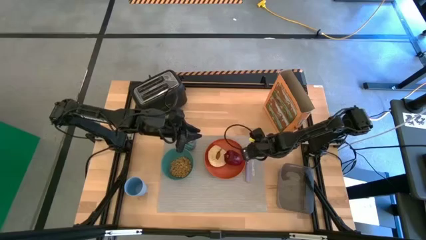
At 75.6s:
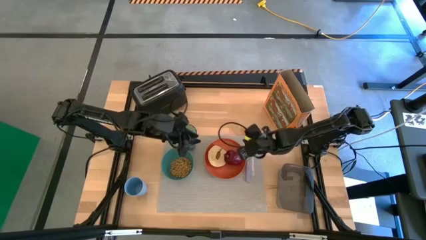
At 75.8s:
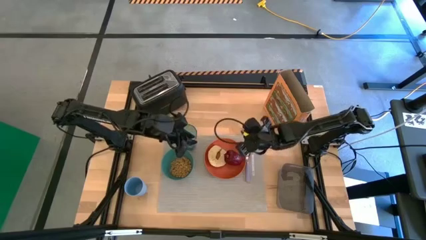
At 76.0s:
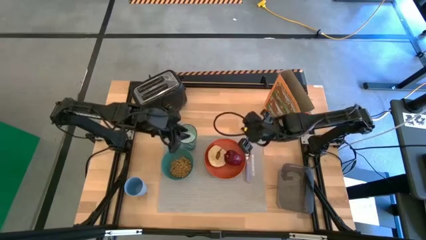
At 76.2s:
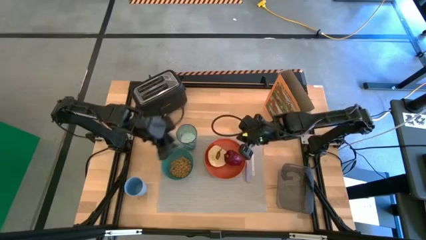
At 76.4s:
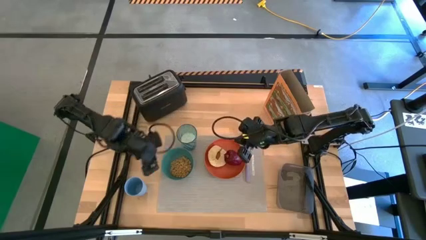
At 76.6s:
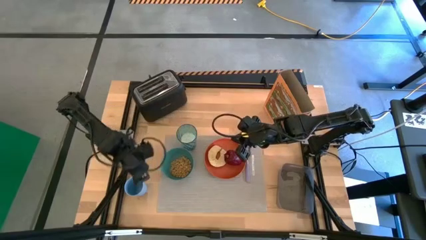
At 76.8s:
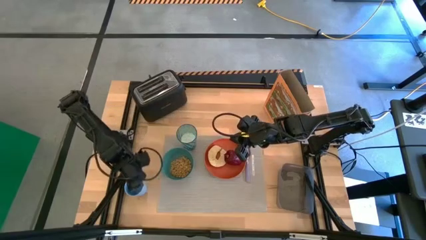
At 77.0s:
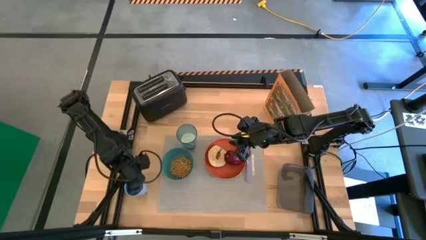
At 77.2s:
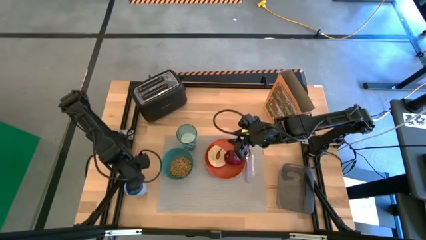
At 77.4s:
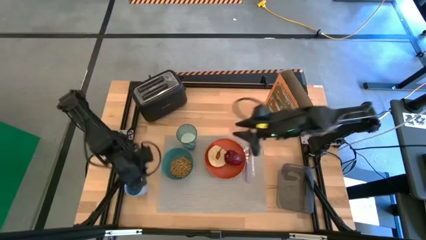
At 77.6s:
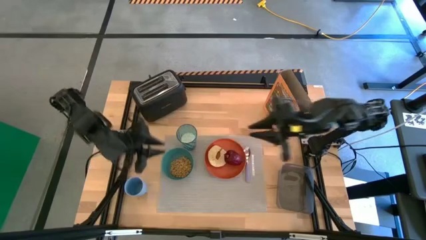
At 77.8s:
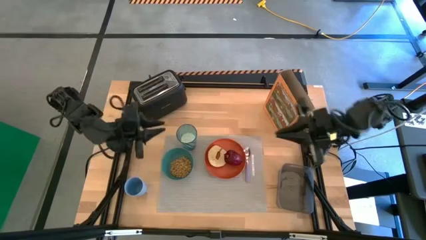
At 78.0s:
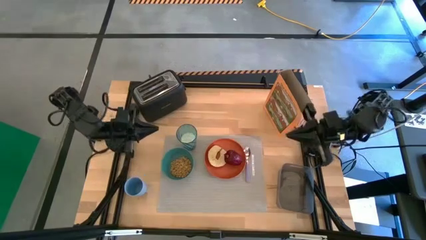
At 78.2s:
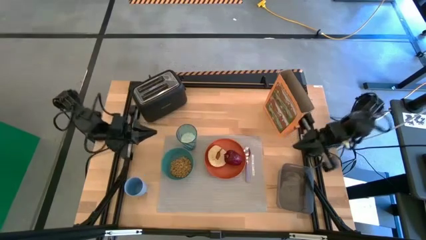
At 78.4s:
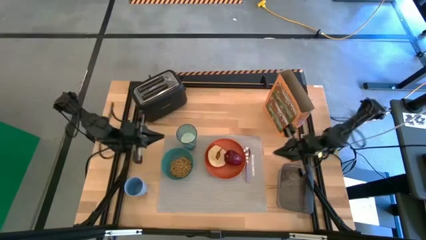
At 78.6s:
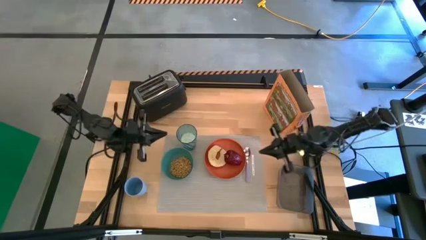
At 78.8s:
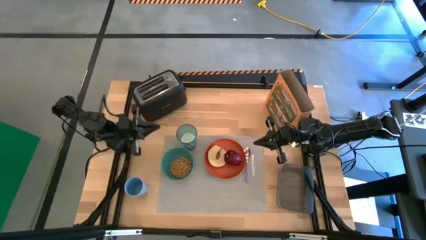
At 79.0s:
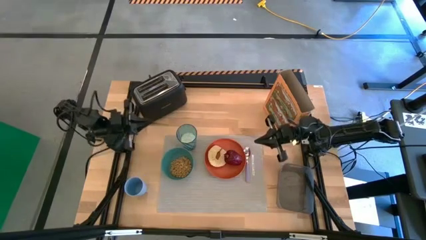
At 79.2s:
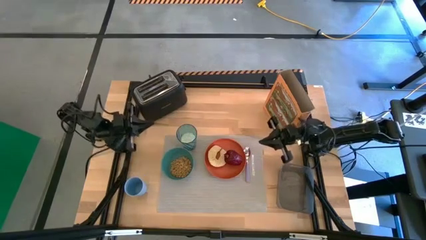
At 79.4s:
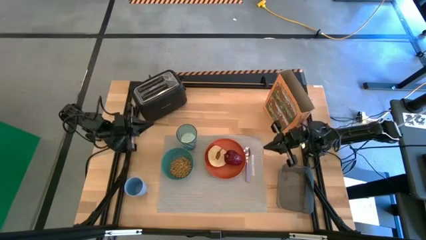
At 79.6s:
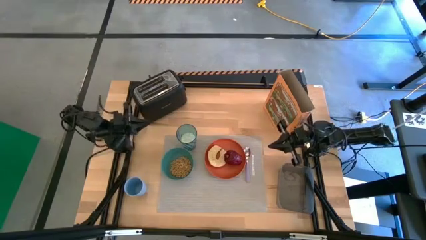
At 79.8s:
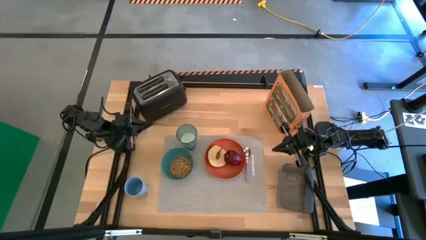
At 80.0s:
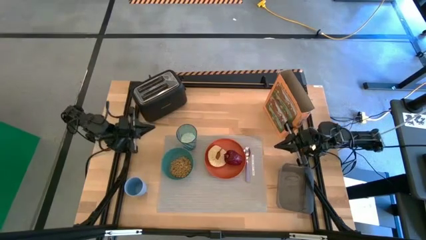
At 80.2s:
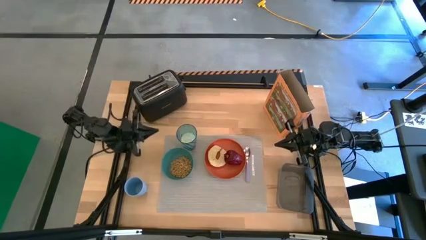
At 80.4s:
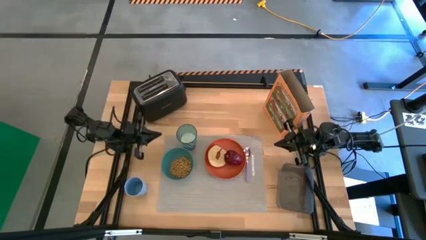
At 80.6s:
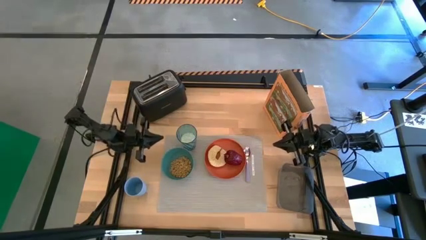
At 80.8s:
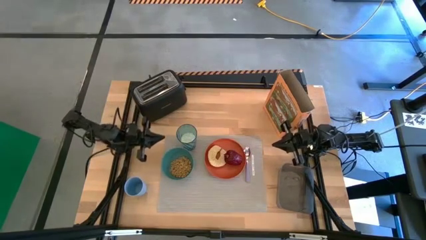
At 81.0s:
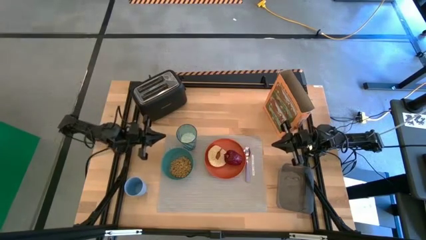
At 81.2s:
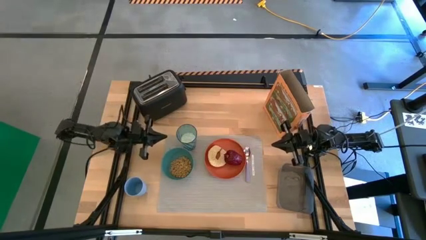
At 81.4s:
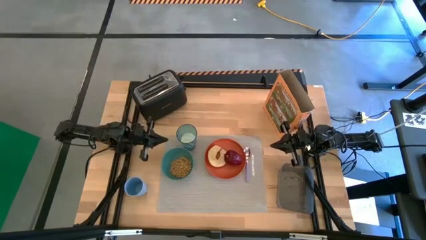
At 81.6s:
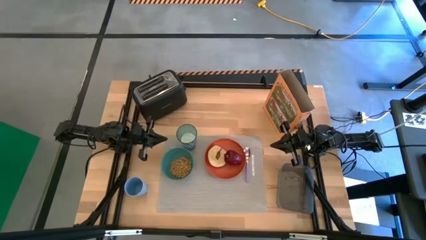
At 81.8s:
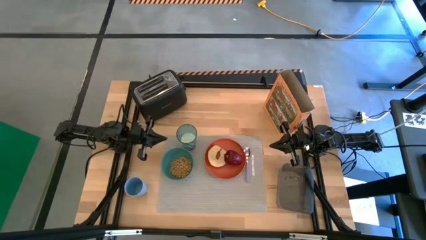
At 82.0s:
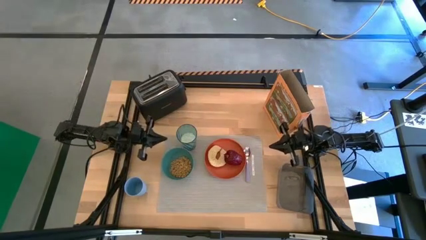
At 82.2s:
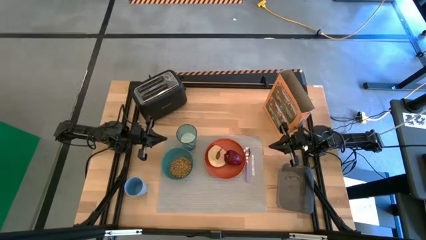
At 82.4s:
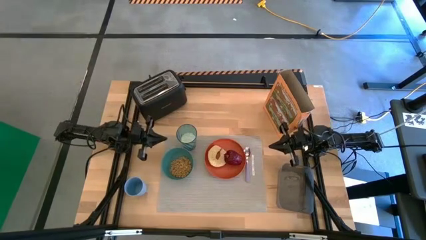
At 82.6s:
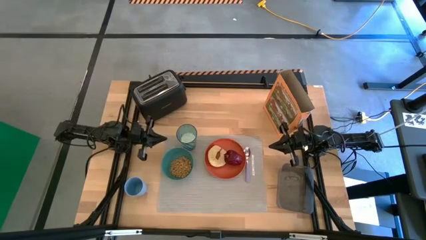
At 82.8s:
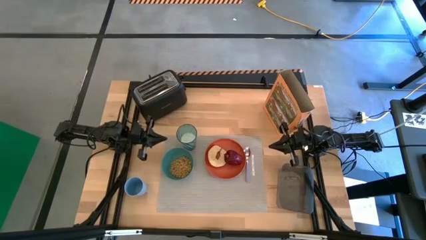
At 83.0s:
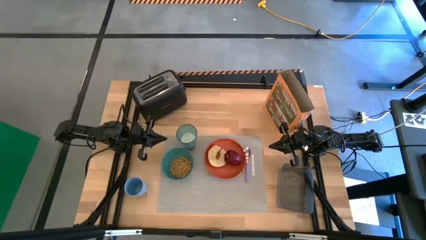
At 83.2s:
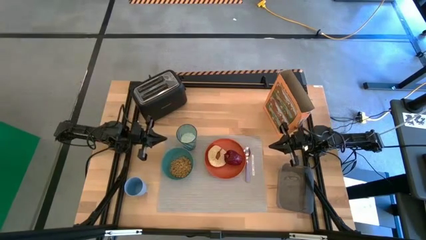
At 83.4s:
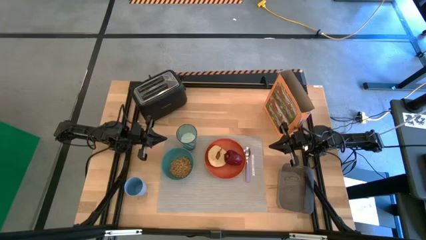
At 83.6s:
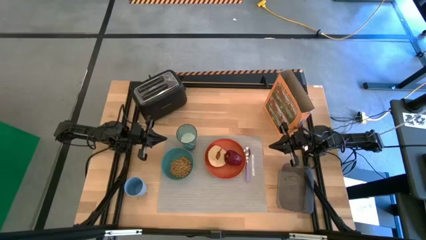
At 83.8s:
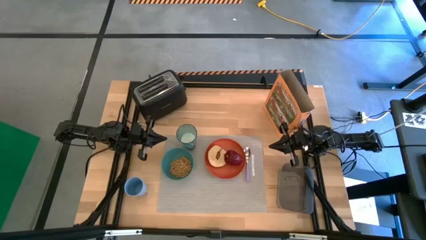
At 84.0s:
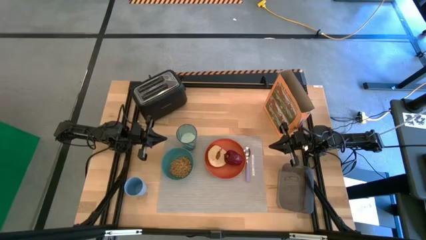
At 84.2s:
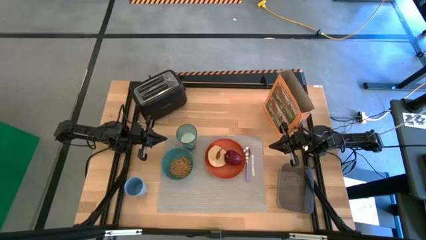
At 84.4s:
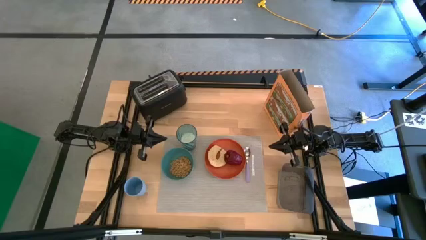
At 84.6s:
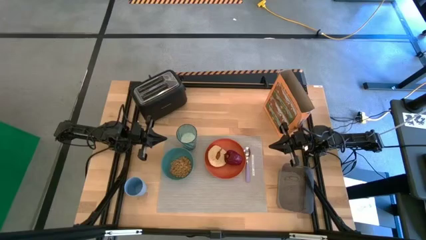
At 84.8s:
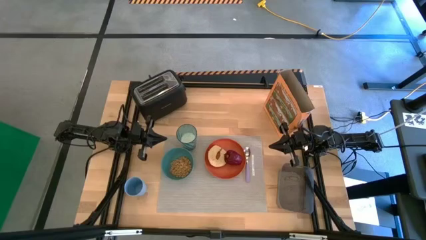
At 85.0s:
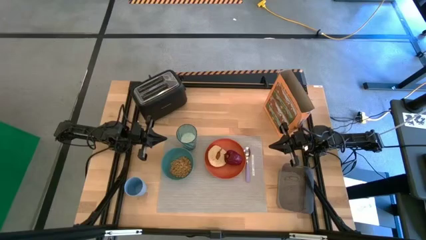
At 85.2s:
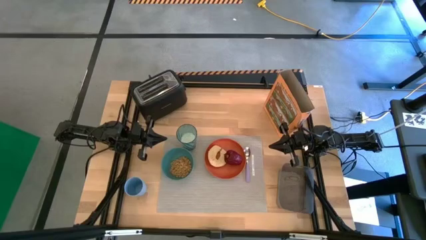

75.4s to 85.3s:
Task: Arrange a breakfast setting
Return to Home Position
